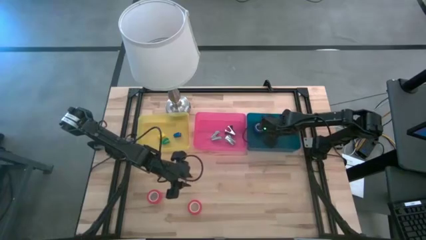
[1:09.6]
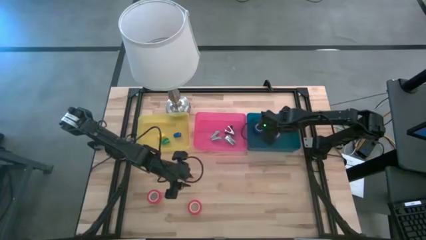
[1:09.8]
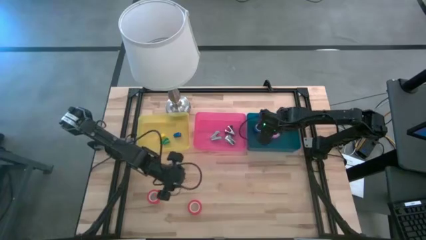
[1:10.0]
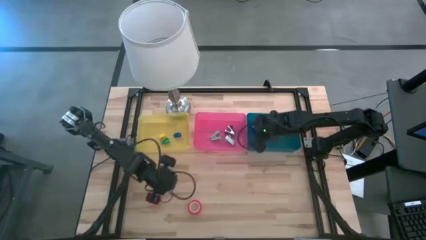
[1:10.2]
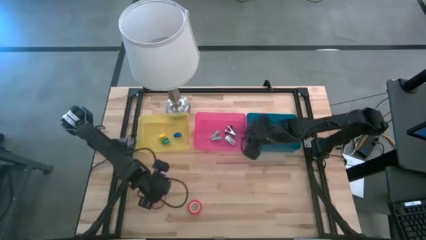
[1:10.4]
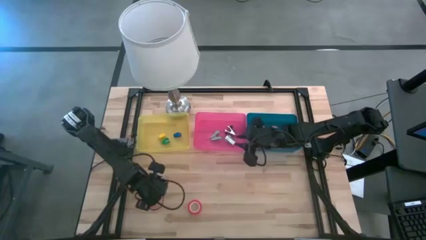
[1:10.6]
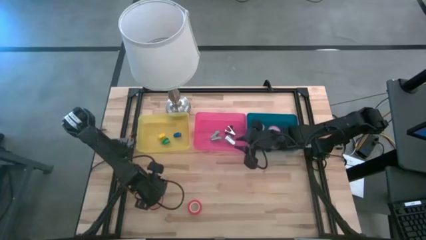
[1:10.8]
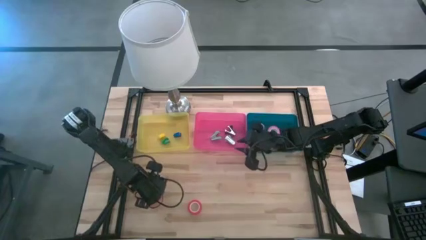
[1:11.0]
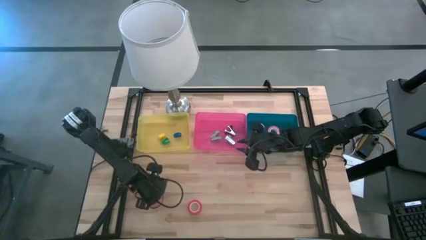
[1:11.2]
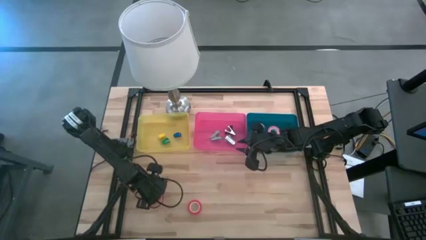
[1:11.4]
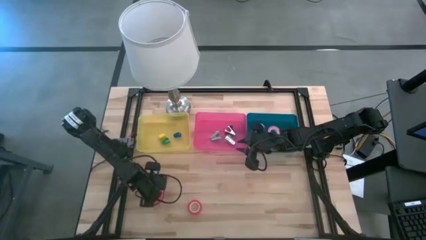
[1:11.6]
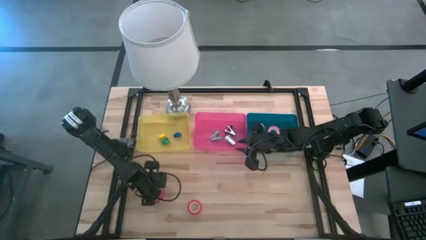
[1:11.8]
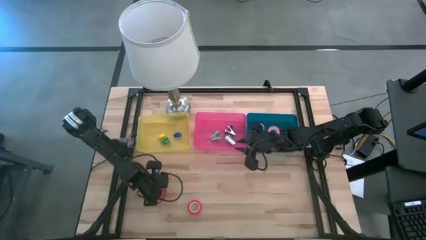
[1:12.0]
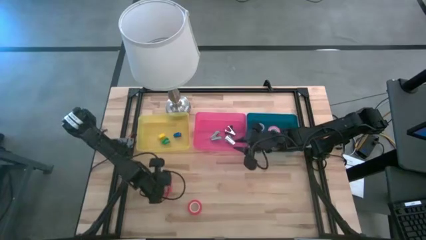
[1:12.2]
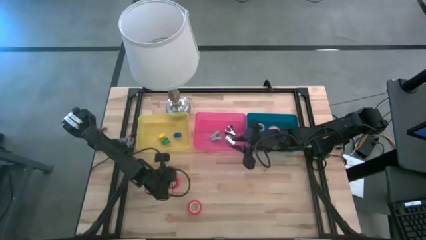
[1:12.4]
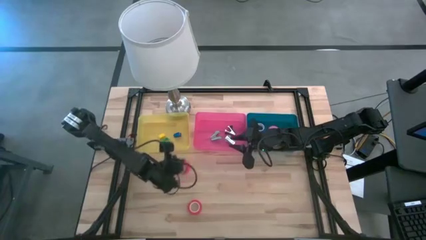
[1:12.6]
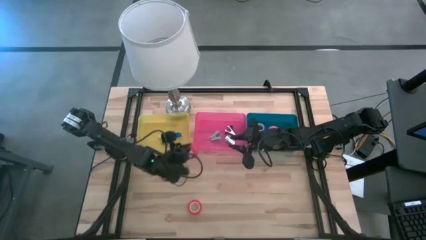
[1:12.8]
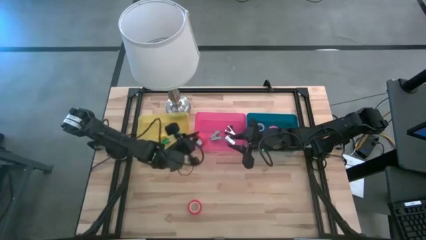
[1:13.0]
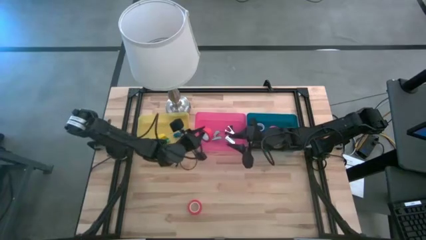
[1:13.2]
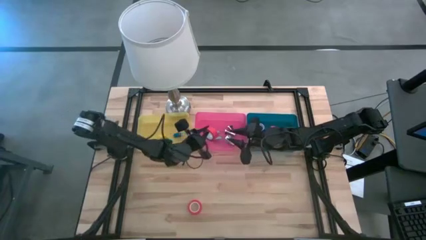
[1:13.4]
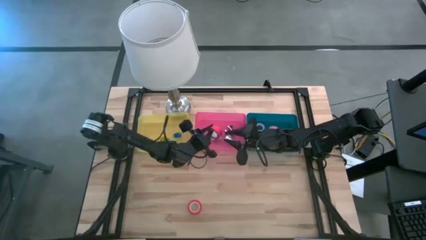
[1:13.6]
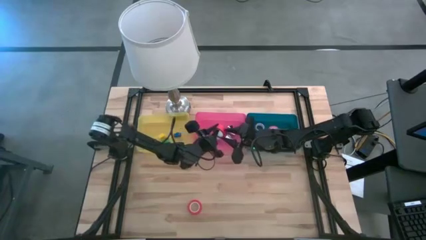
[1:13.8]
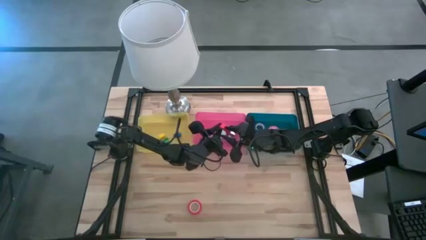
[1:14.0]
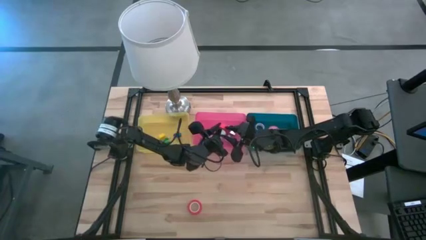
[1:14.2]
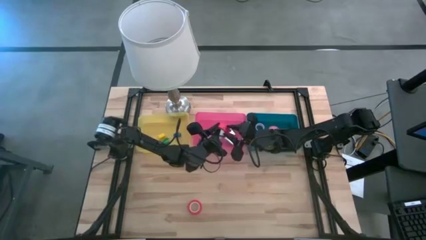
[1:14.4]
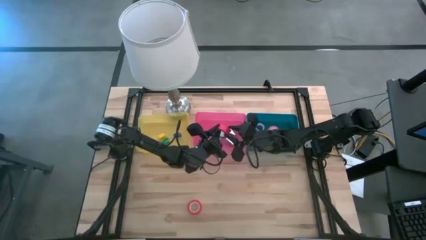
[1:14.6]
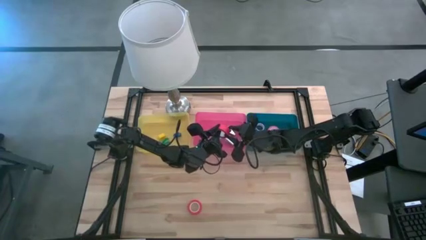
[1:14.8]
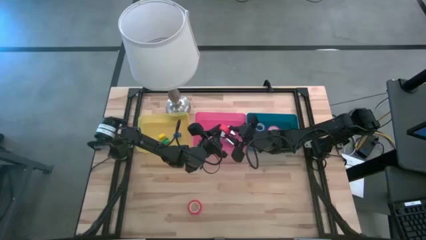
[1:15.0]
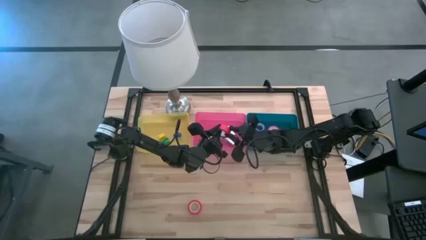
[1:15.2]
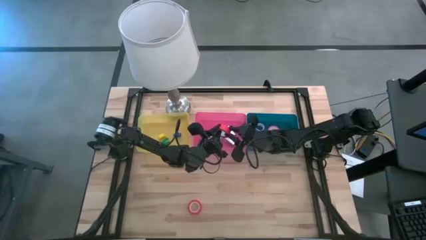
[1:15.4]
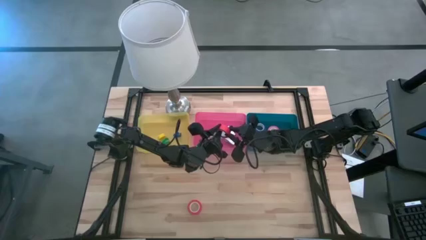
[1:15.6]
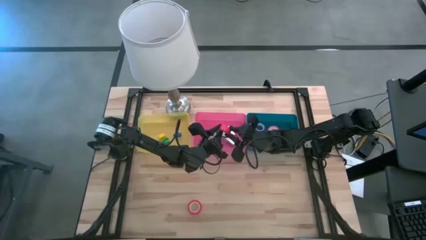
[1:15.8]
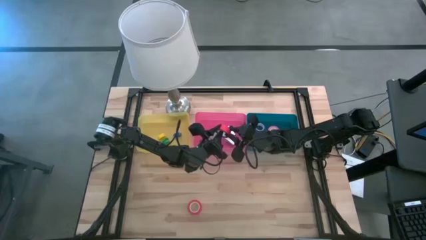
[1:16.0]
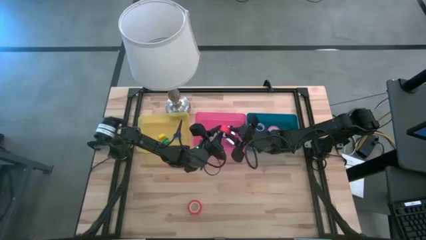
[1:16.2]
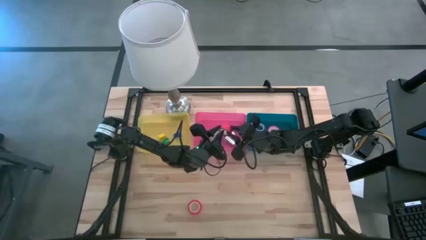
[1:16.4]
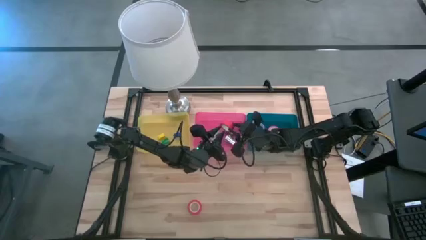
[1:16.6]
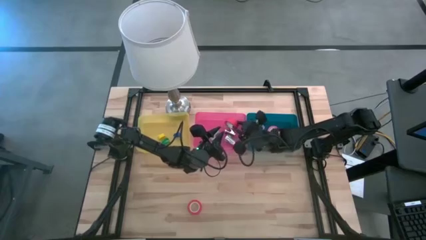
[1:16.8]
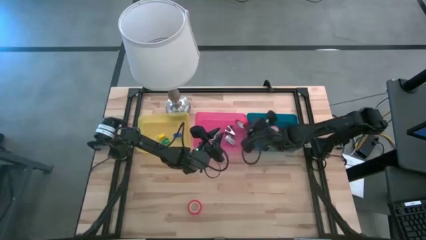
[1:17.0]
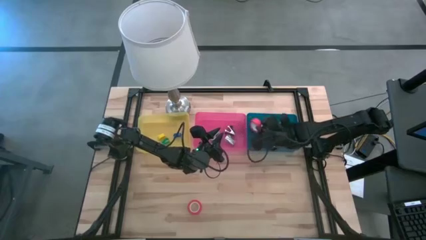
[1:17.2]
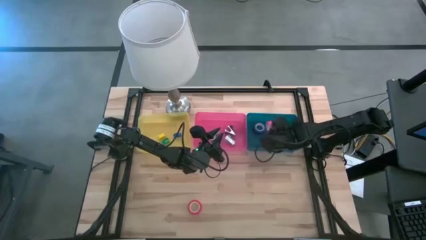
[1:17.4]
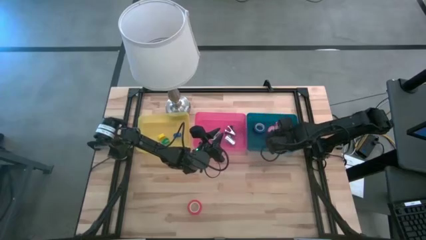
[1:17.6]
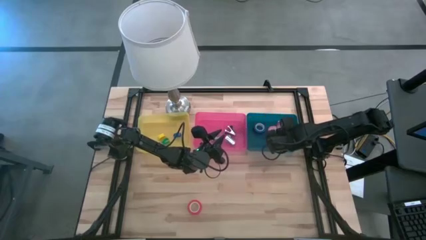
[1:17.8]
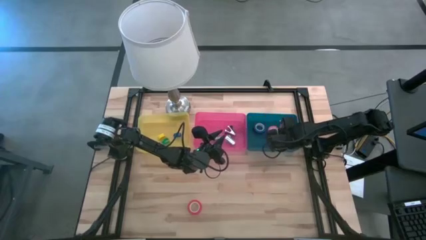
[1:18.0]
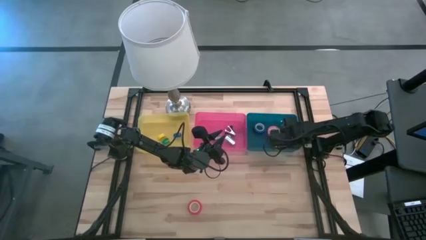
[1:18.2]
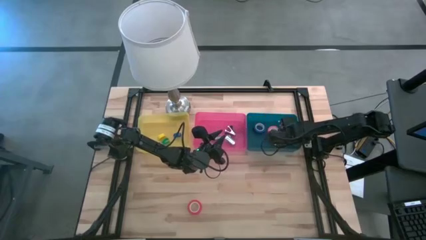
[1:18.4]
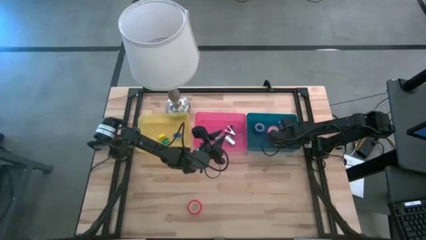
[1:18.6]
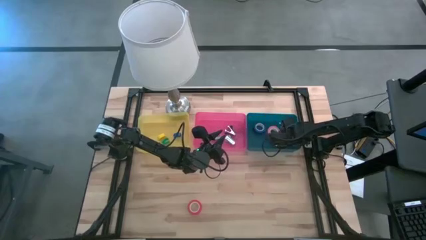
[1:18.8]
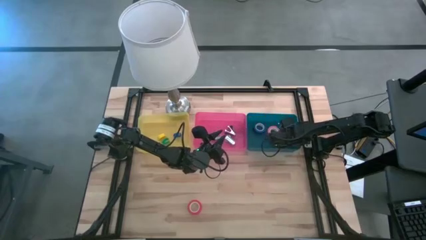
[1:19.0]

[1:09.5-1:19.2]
Task: Pick and place Stapler, Stapler remover, tape
Put the left orange tape into the blue bin

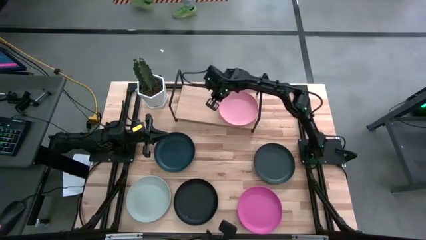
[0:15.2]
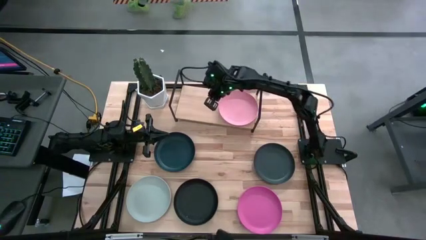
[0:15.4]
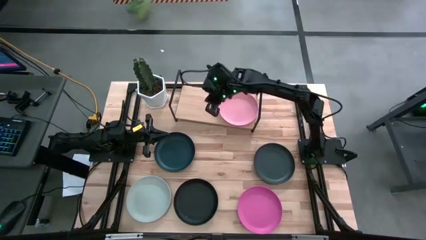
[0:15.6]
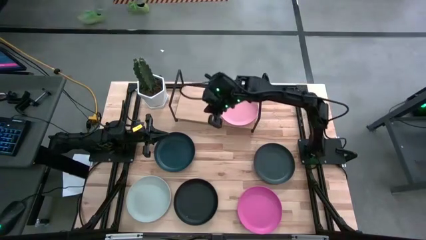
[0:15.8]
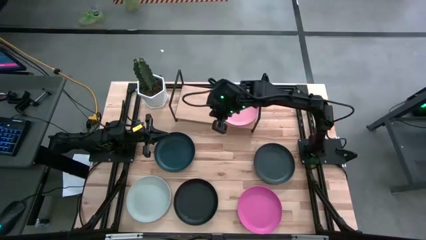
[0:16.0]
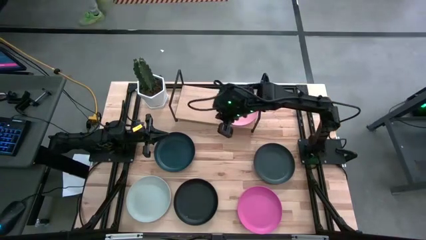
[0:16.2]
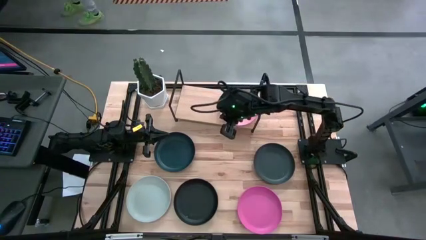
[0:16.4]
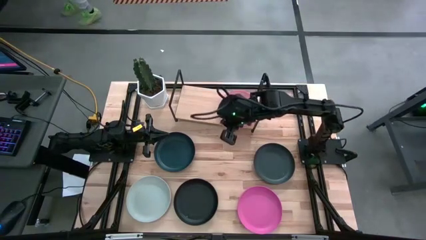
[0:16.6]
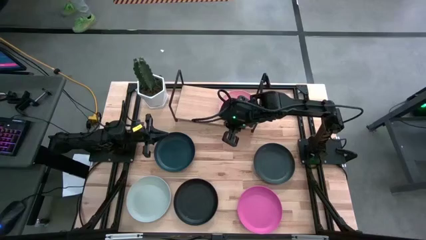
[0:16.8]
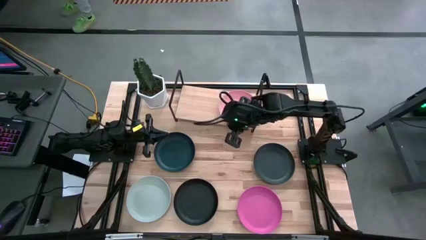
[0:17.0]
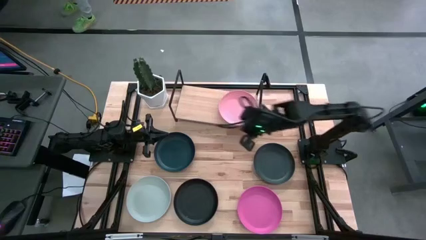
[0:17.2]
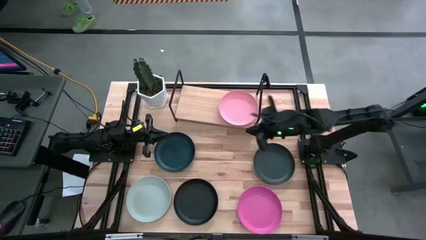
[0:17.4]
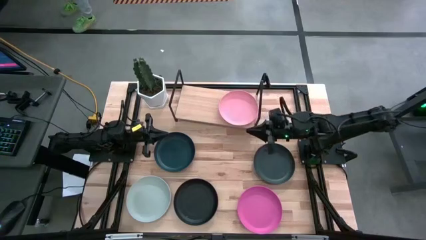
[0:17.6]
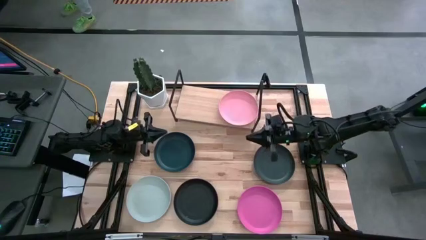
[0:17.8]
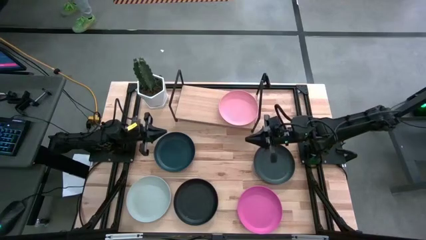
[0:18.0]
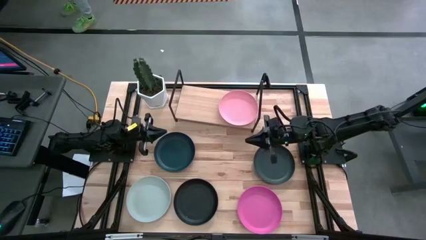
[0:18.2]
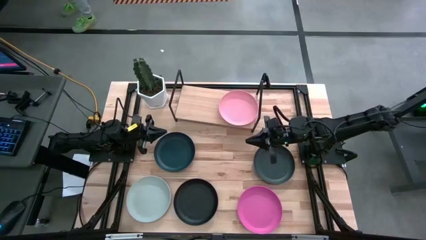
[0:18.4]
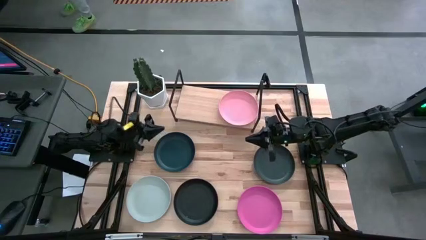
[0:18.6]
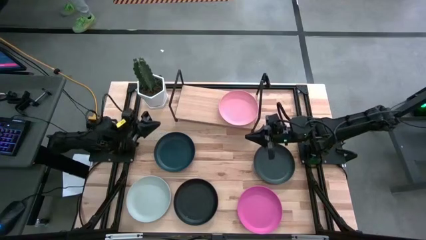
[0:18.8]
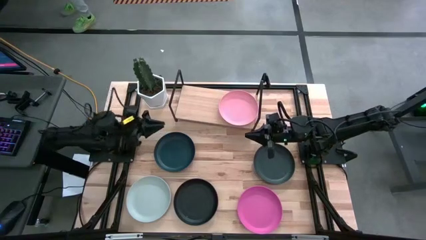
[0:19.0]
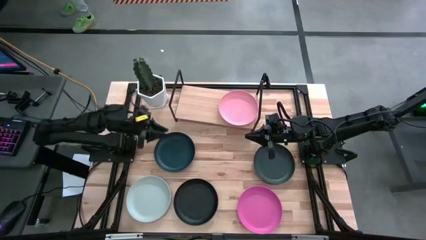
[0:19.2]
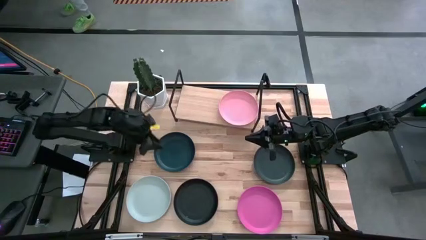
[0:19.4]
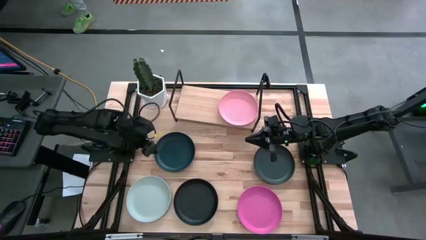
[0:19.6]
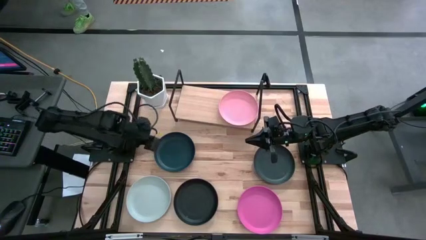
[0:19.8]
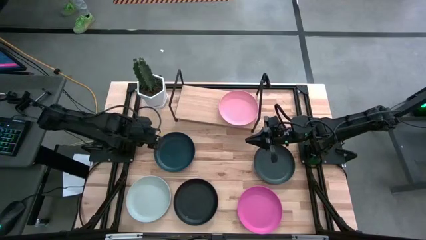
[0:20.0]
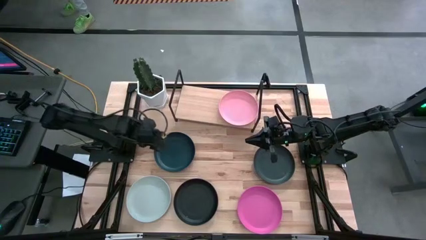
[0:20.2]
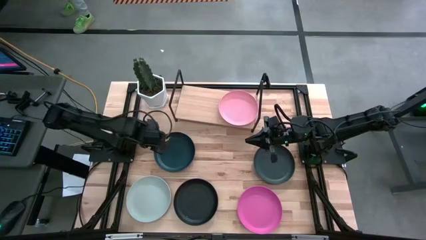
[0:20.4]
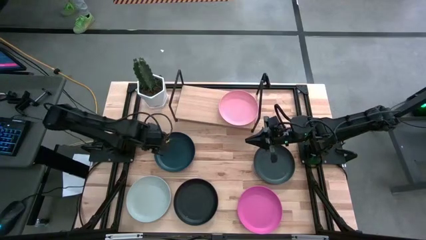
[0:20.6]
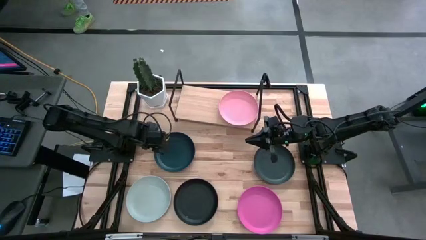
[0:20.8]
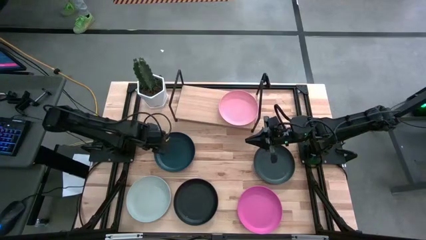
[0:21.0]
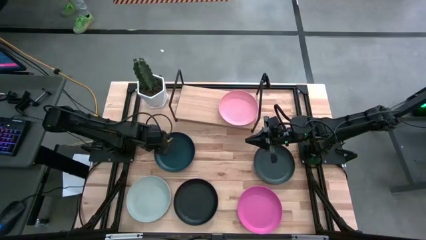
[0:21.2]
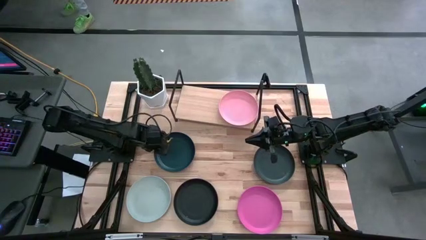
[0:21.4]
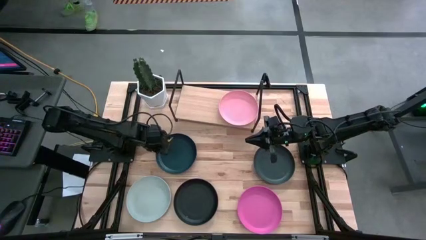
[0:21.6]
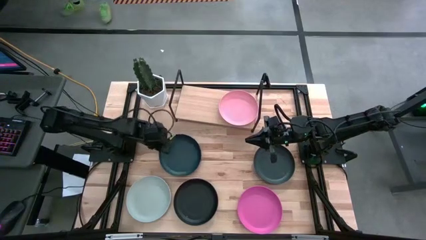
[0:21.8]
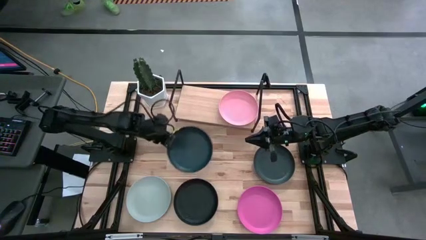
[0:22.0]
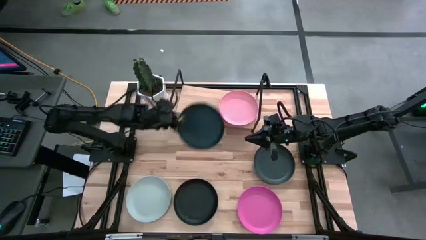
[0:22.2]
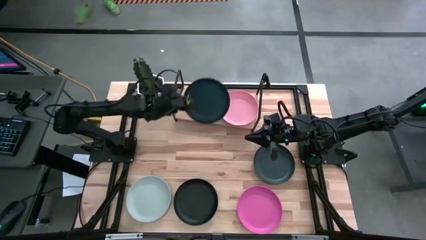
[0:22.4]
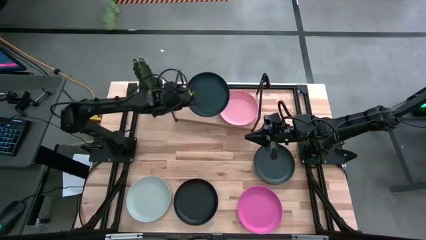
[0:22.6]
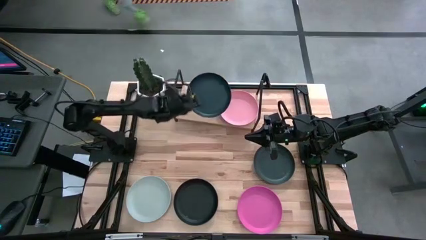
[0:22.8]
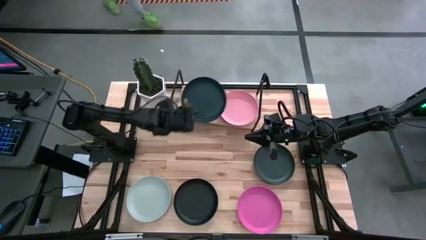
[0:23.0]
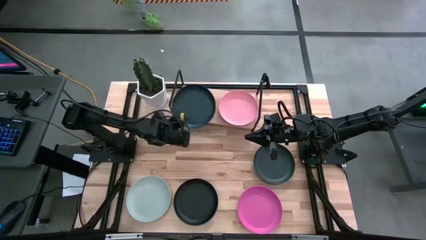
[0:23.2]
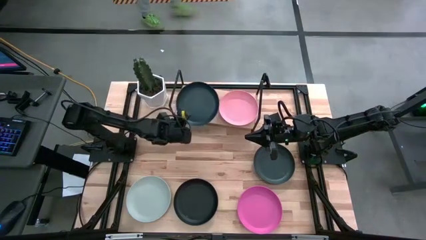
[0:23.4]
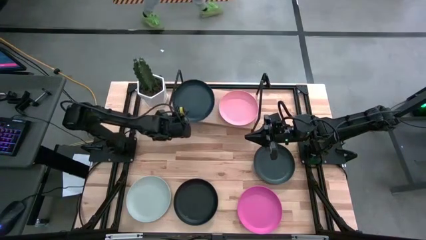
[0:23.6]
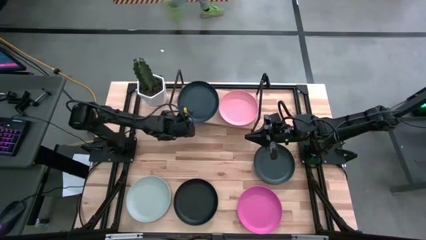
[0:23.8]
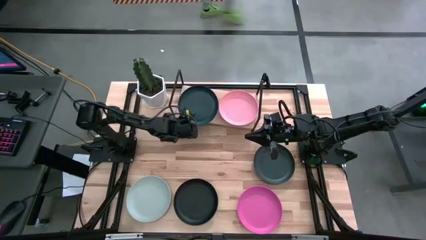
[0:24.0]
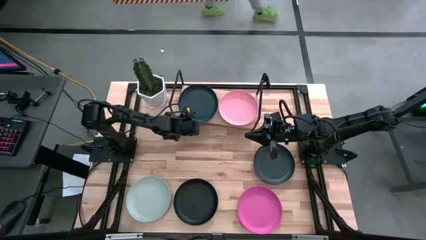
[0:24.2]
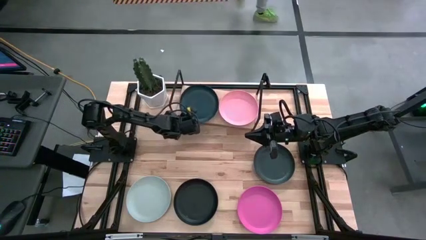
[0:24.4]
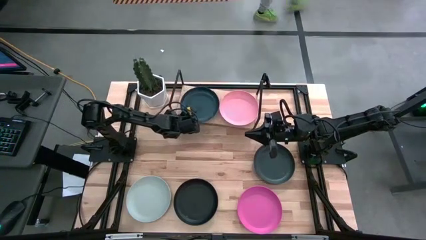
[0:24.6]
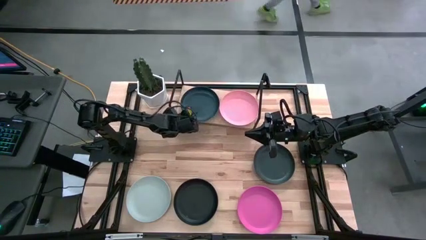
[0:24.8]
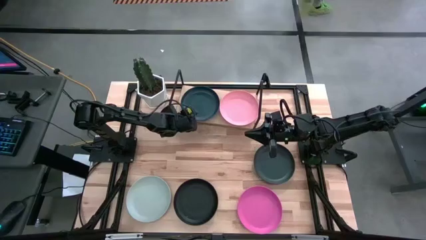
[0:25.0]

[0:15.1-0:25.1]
Task: Place and stack plates onto a shelf
Put the left dark green plate on the shelf
